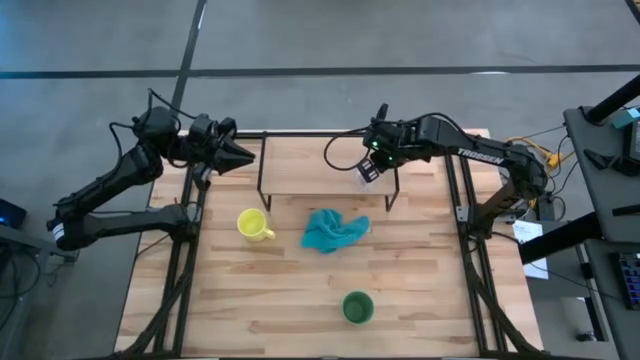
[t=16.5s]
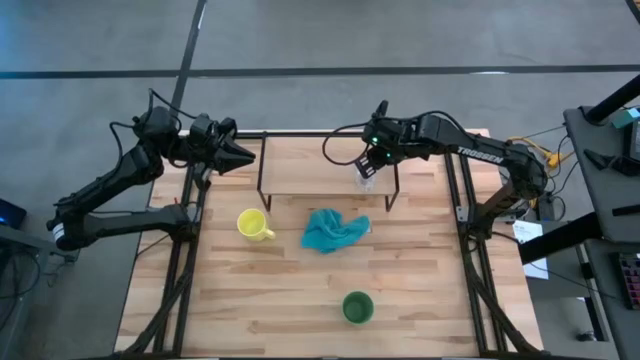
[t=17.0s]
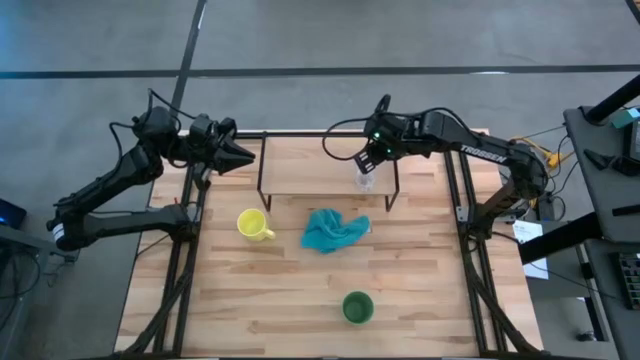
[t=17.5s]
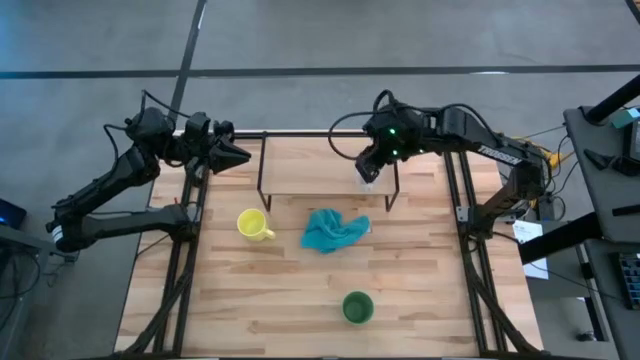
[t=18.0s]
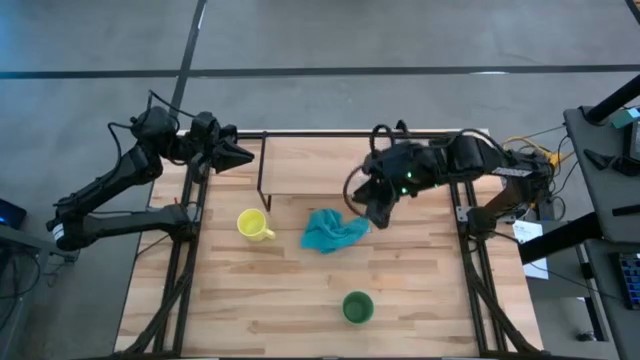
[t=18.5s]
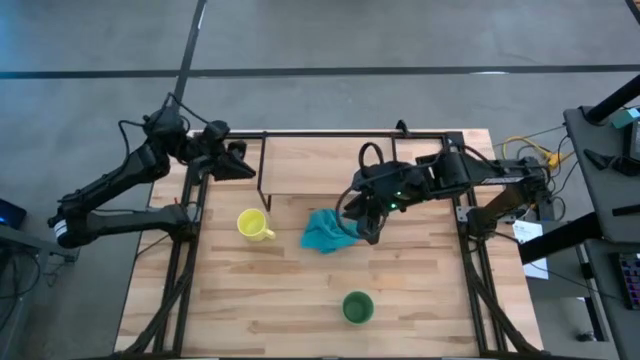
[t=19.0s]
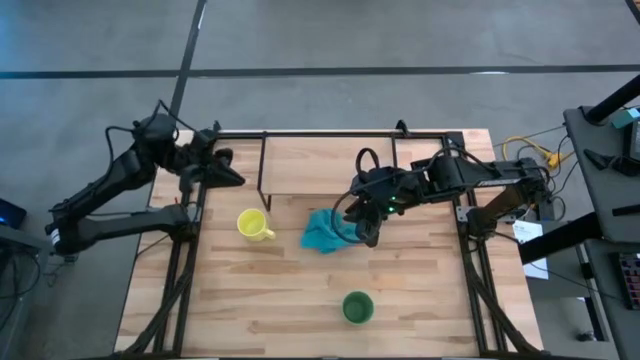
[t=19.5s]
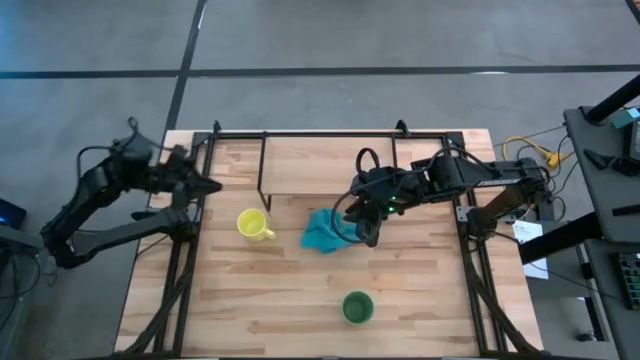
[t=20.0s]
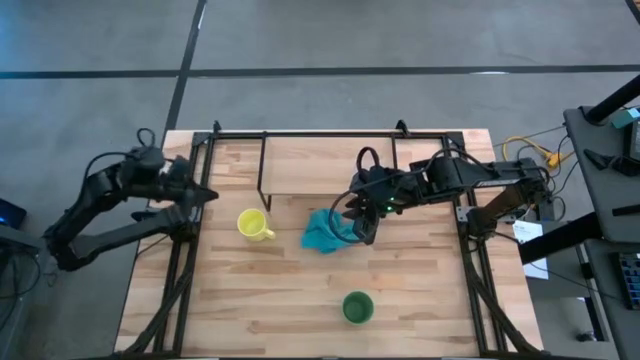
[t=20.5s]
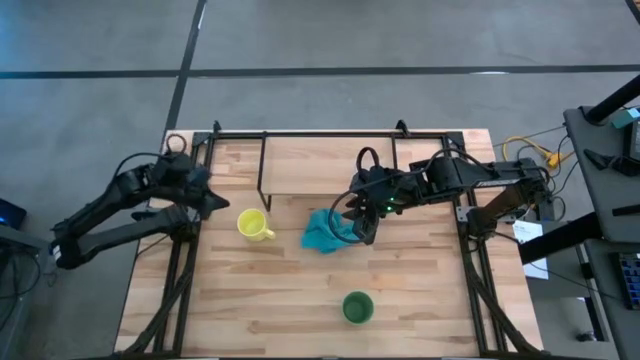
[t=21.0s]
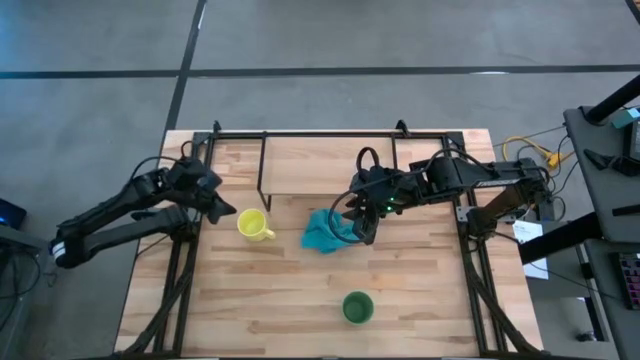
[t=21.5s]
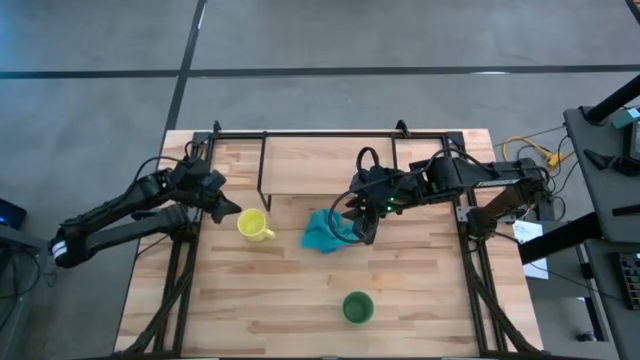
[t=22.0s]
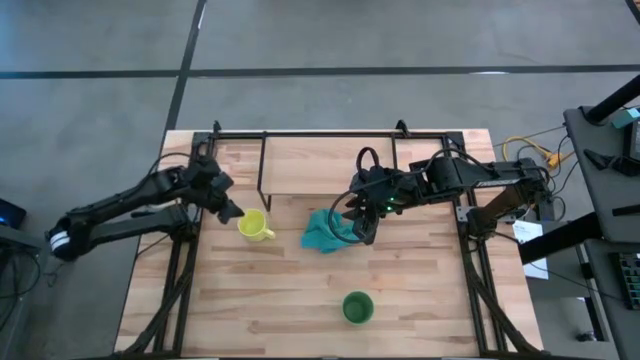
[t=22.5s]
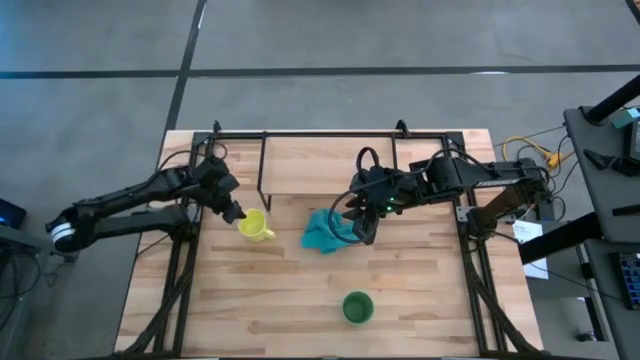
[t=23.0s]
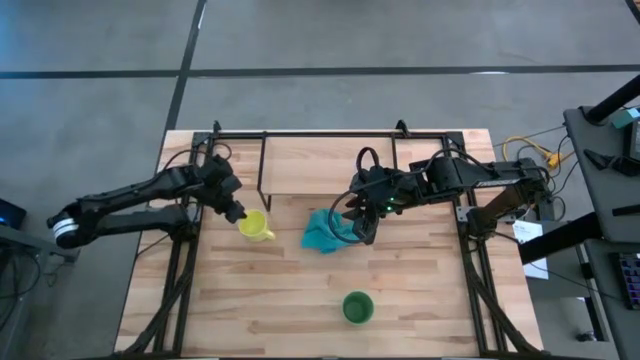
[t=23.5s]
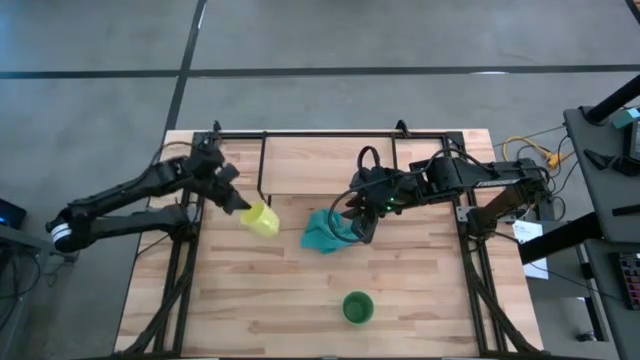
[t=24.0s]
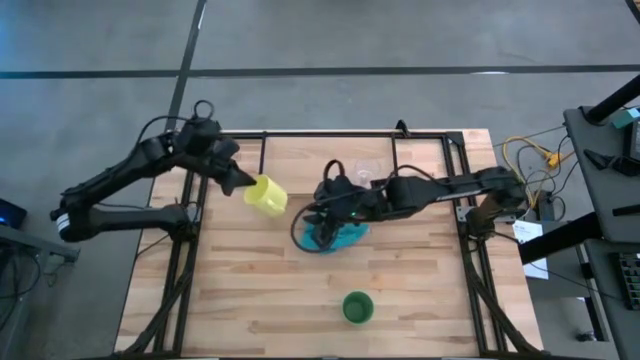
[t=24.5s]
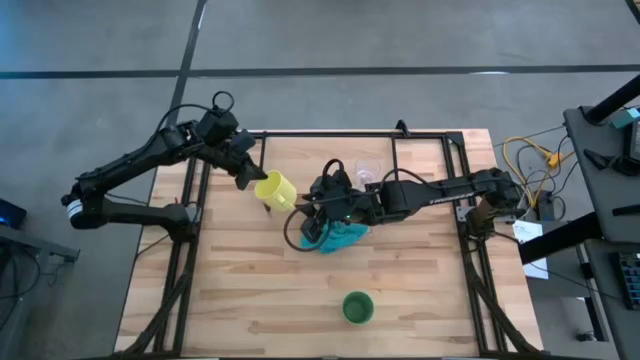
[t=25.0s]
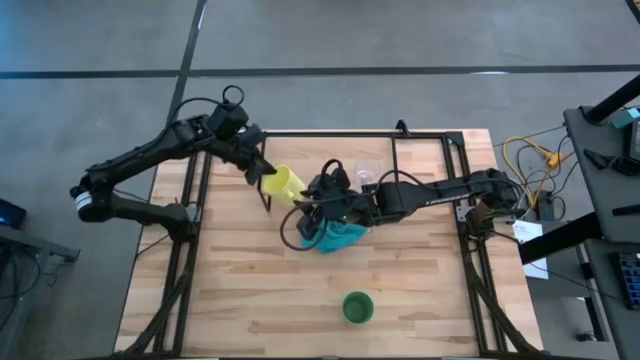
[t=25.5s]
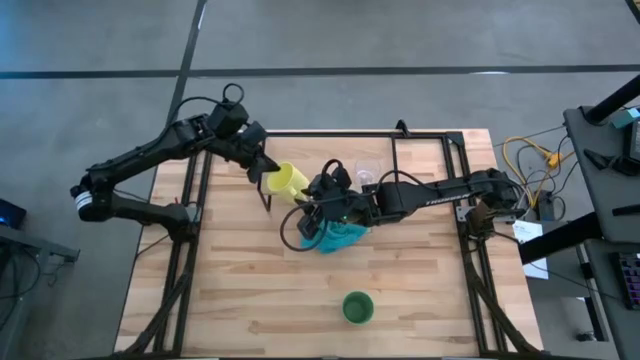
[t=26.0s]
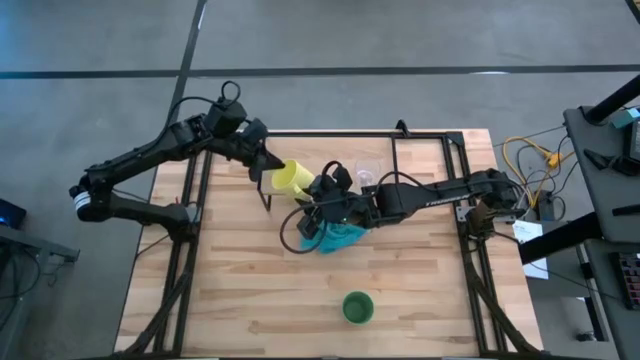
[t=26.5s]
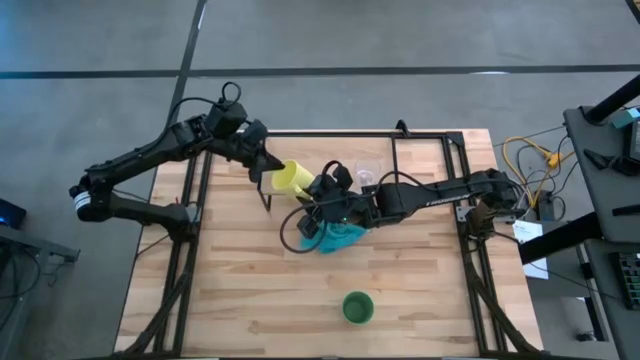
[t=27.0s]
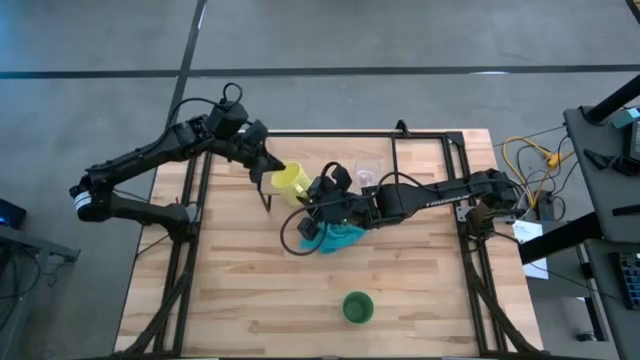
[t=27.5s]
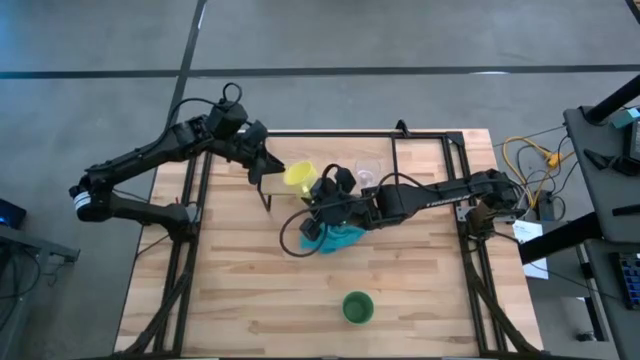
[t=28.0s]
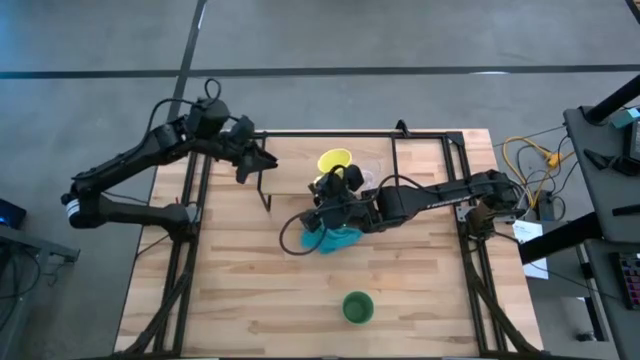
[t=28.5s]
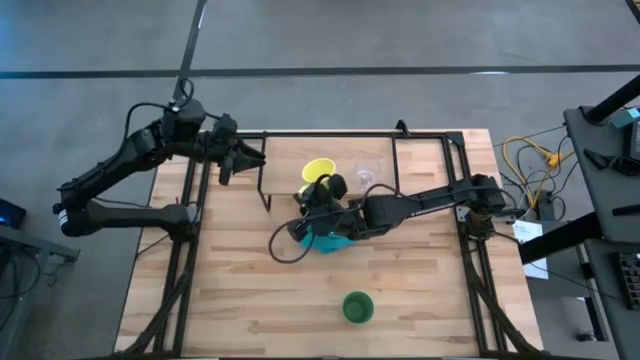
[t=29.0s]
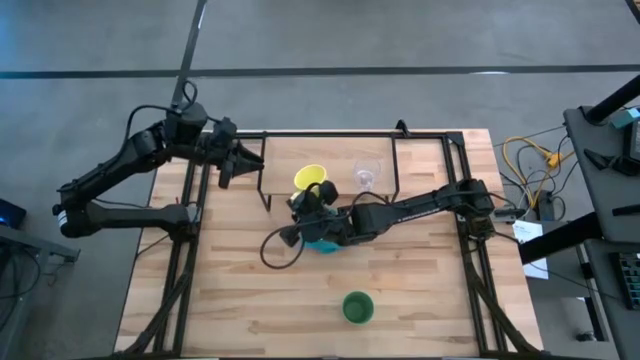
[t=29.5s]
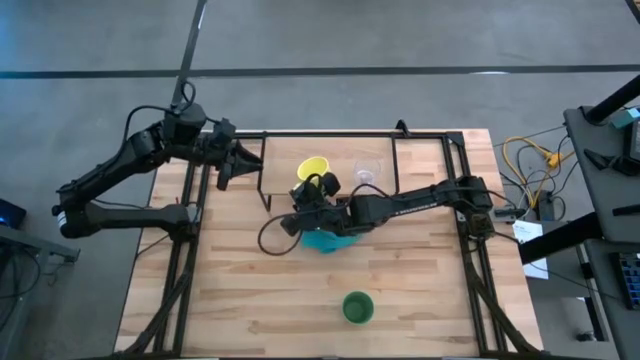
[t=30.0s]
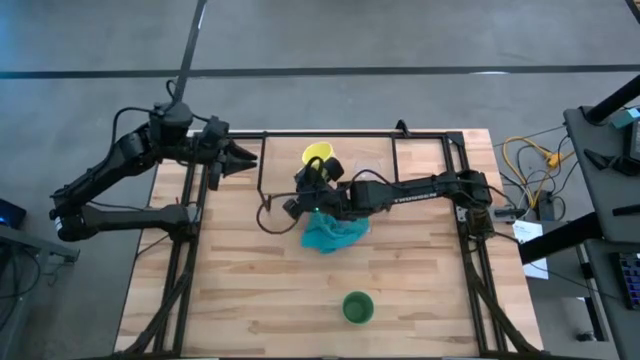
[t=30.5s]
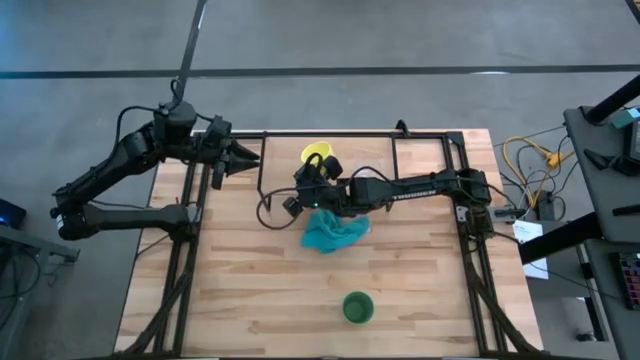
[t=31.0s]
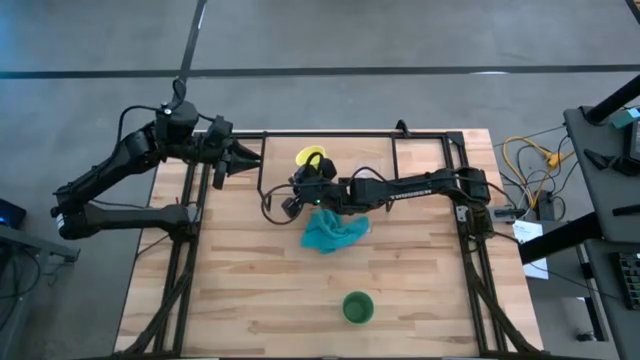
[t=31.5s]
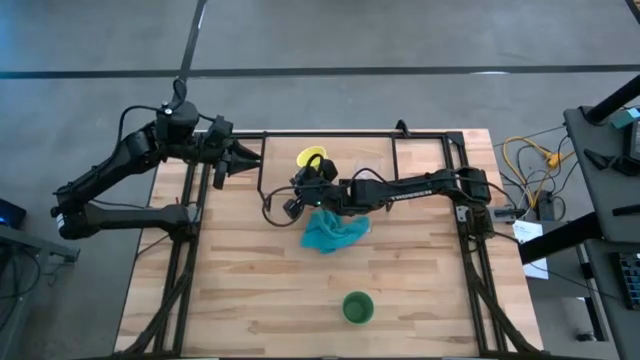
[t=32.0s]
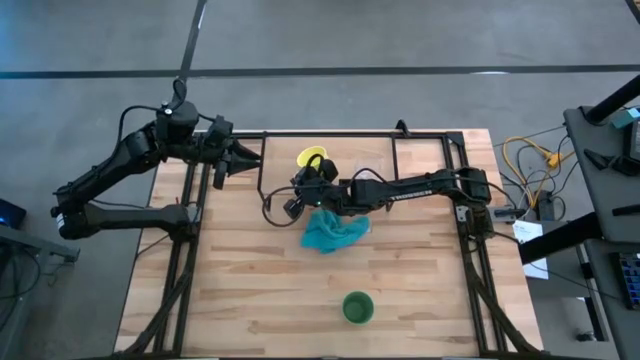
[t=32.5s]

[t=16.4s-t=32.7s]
Task: Stack small to large cups/mugs on shelf
Put the yellow cup on the shelf

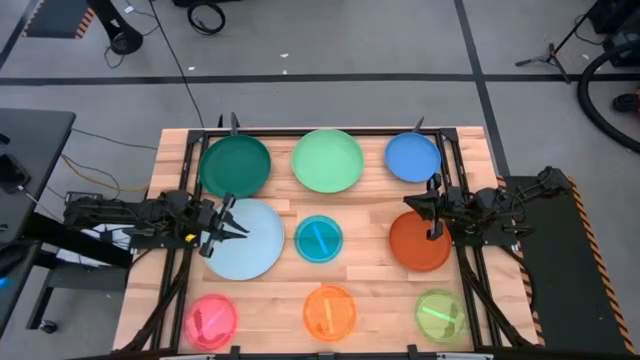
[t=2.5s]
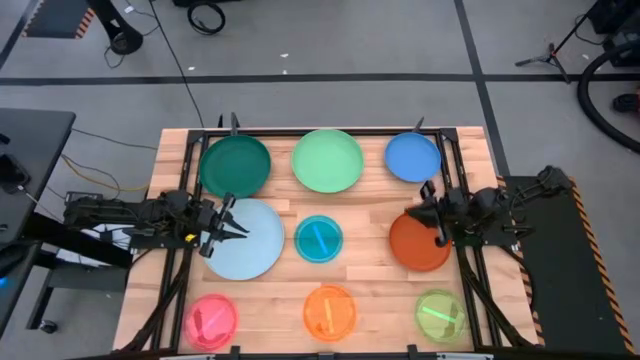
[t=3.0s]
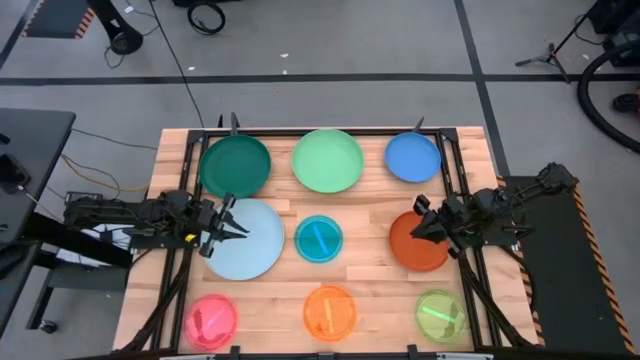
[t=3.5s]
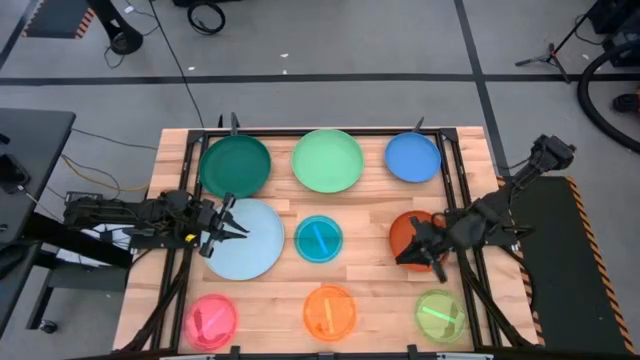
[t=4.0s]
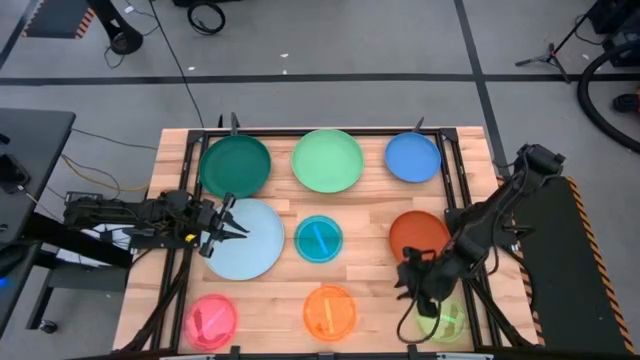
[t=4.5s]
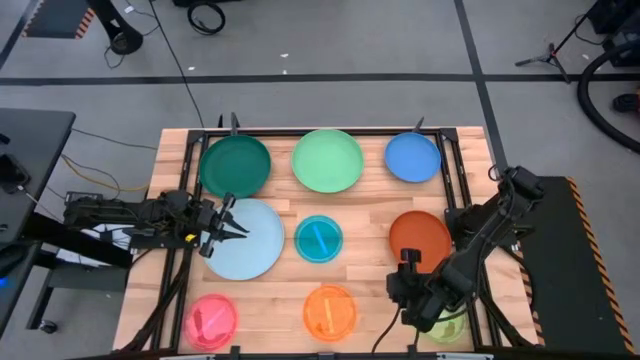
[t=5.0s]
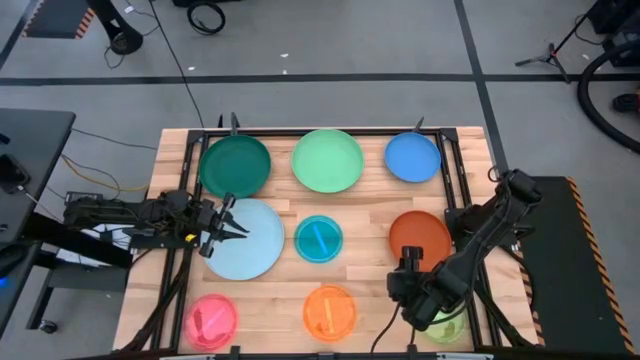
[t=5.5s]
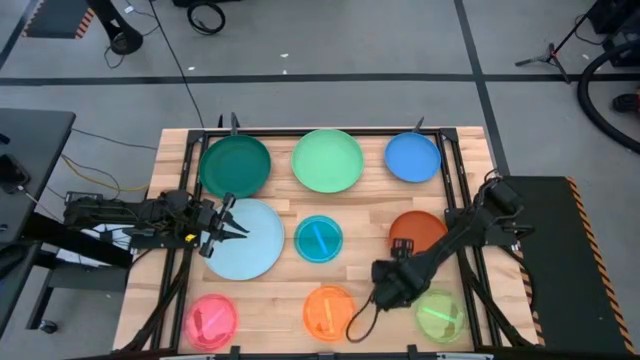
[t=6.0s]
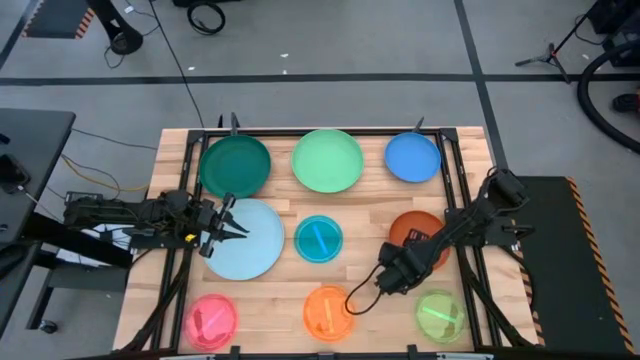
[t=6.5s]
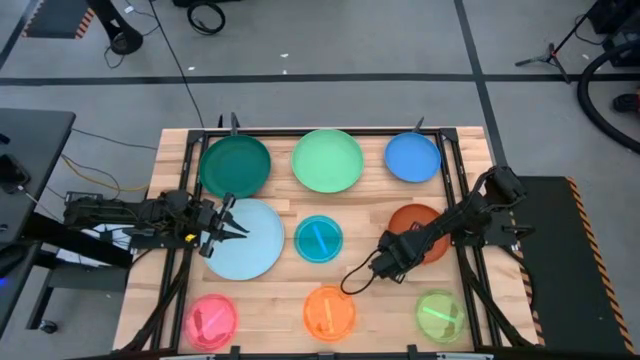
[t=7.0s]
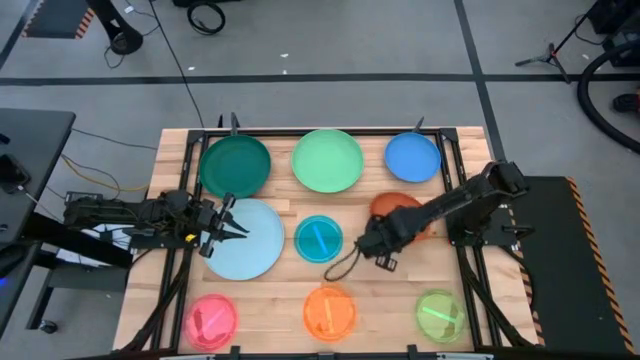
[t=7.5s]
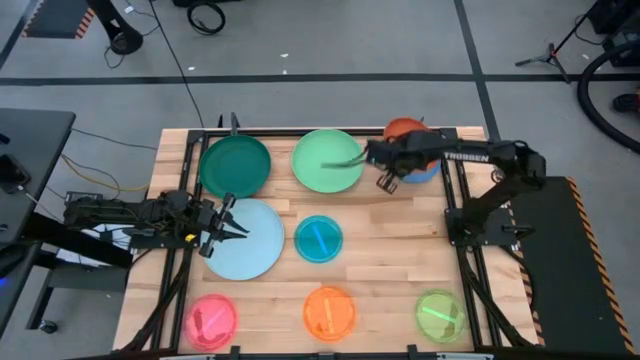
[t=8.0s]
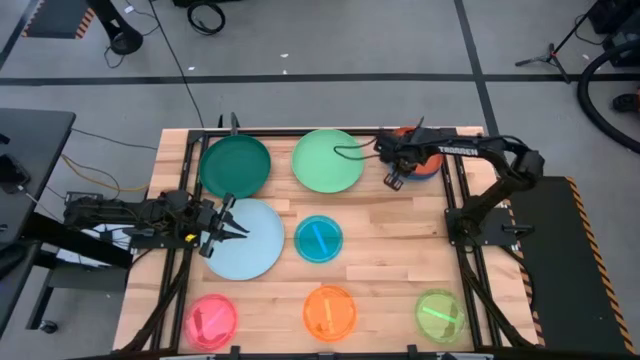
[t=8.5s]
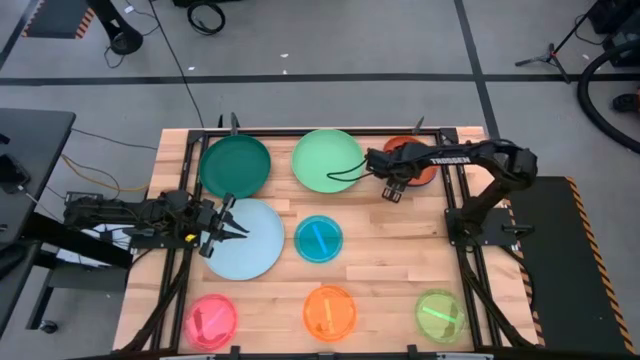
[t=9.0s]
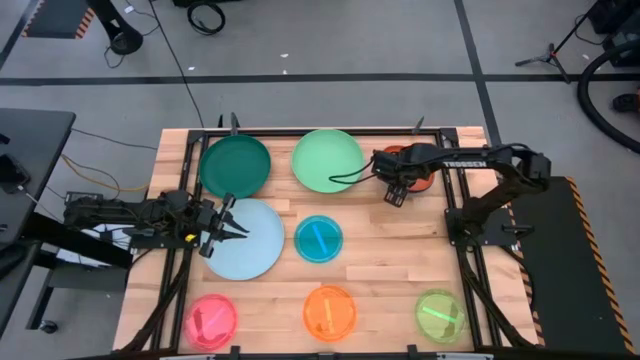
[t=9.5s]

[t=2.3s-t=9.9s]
Task: Stack plastic plates
Stack the orange plate on top of the blue plate
